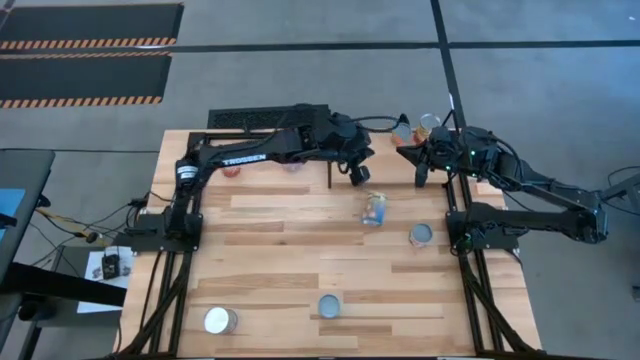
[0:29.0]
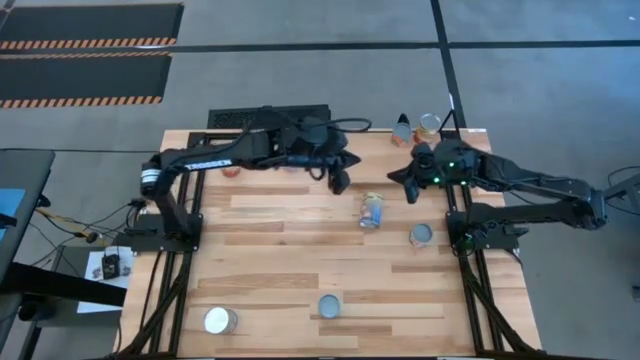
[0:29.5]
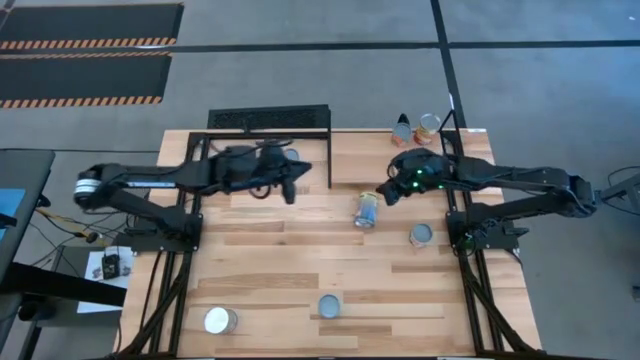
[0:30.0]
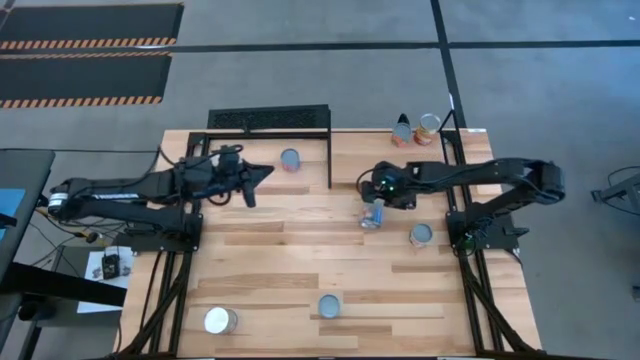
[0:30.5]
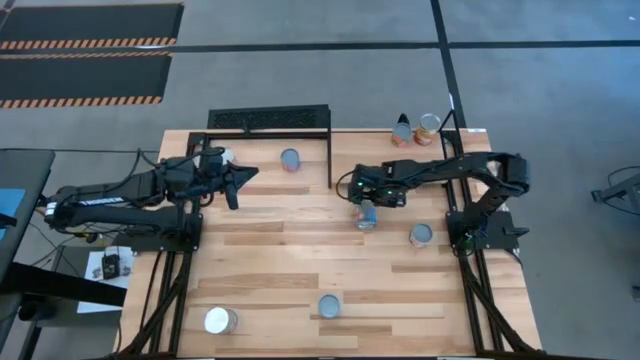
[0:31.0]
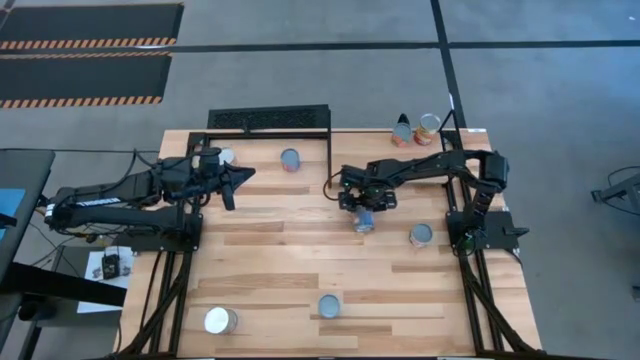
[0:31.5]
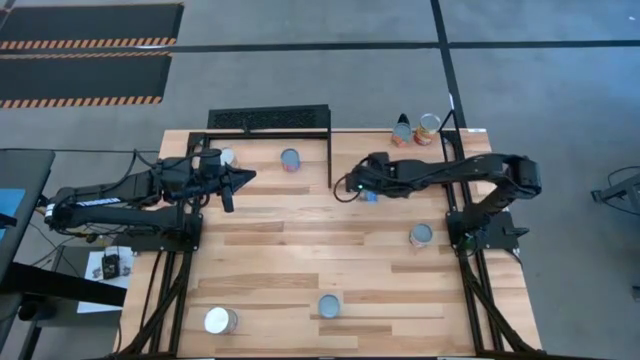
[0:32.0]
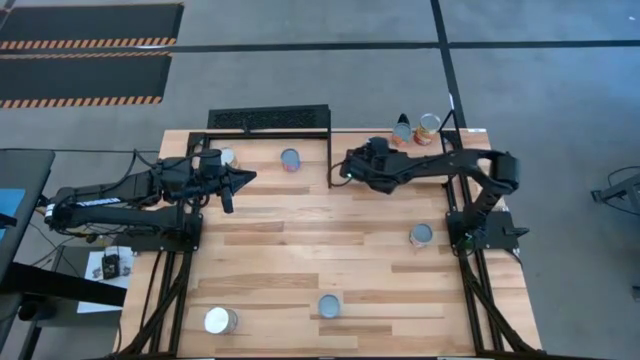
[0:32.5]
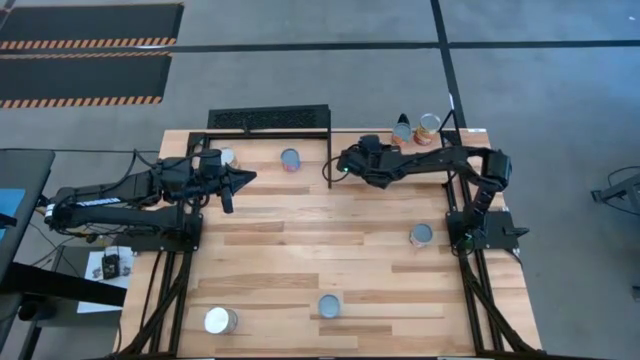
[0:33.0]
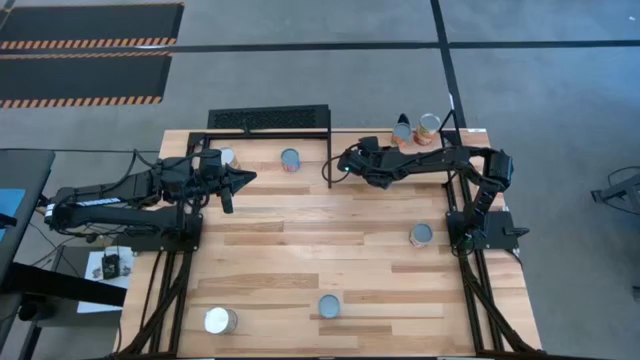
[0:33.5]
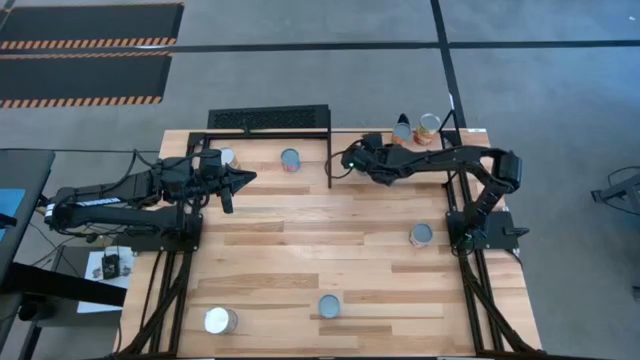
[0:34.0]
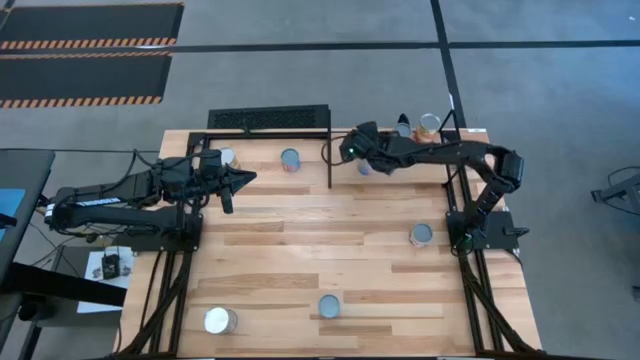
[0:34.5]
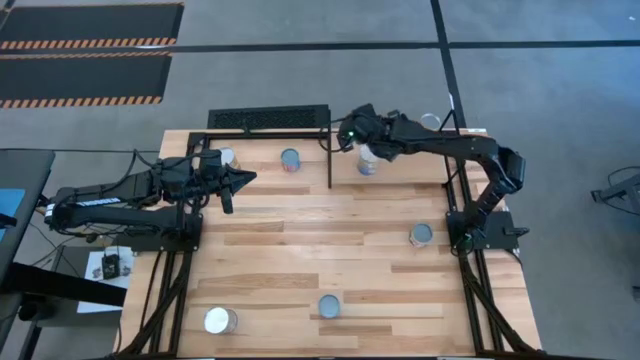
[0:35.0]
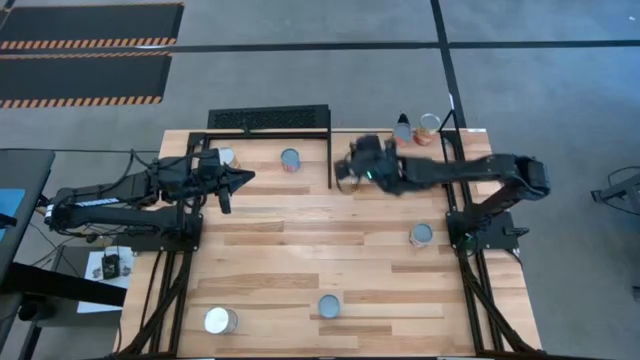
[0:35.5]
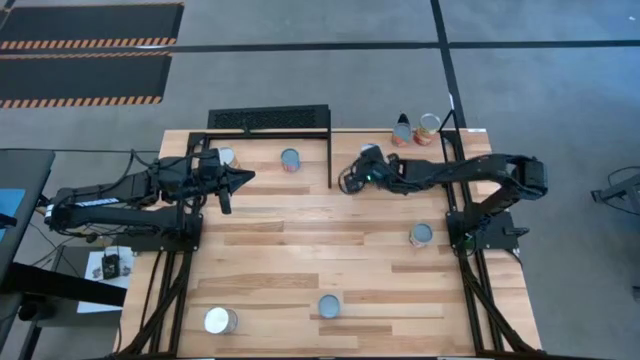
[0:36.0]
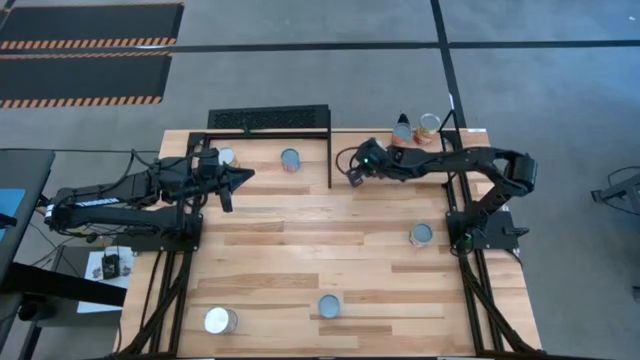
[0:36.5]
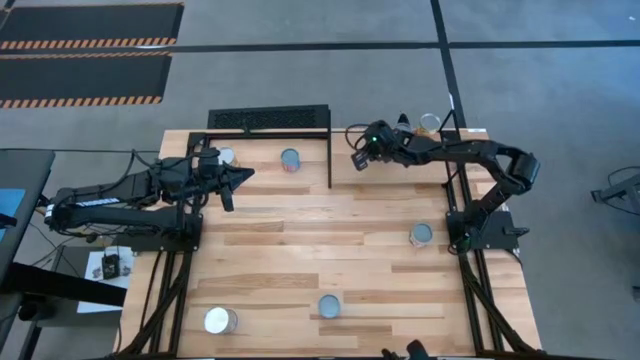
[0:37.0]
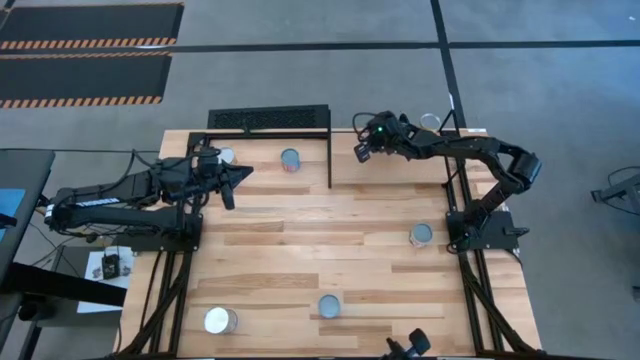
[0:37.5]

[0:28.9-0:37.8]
Task: Pick and place cans onto a shelf
Put the top canned peaches on the shelf

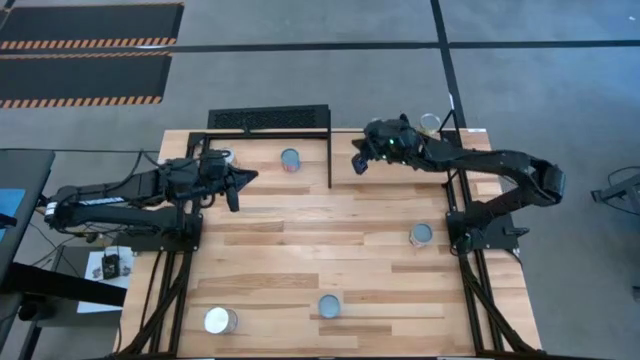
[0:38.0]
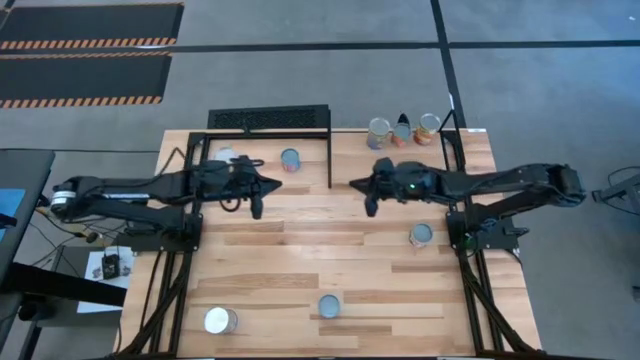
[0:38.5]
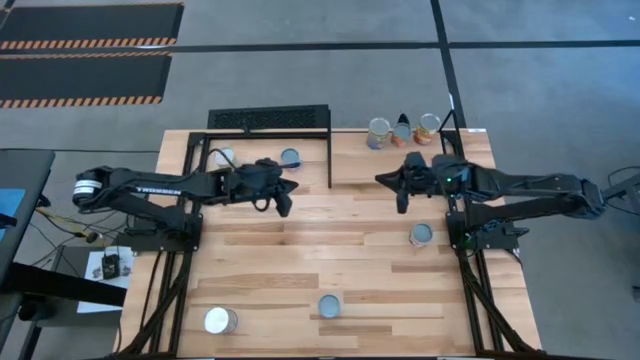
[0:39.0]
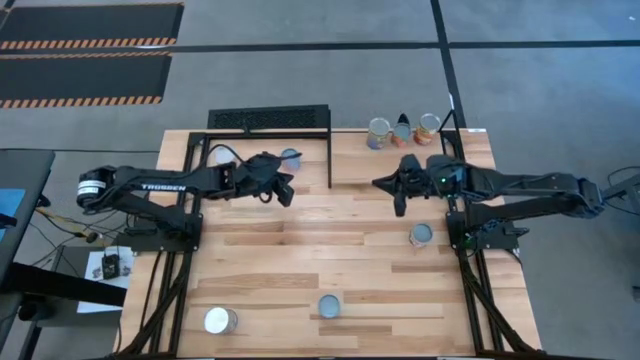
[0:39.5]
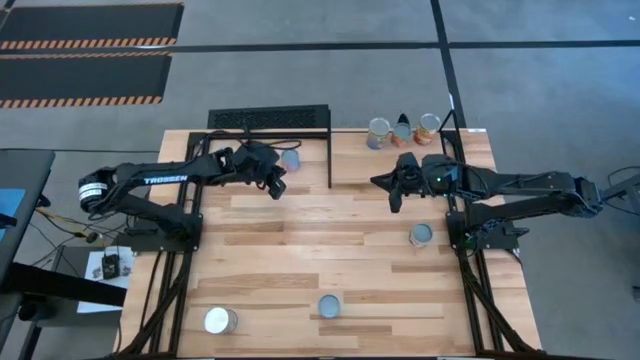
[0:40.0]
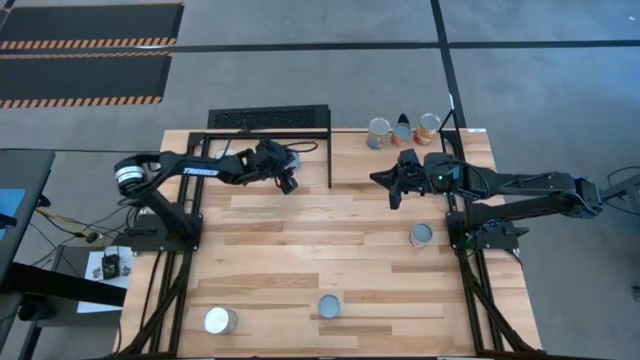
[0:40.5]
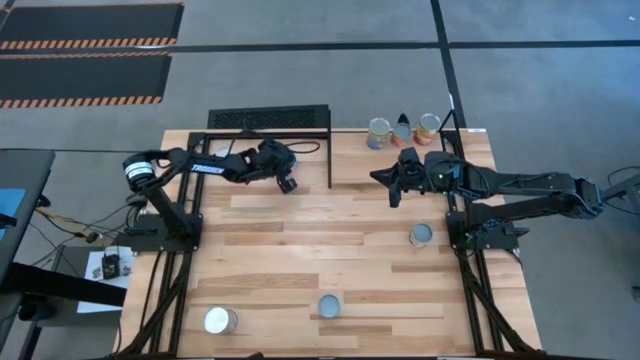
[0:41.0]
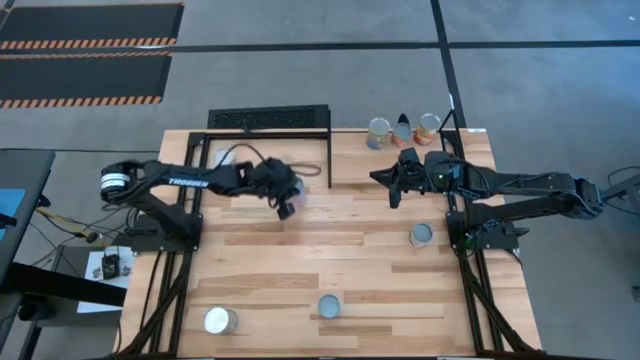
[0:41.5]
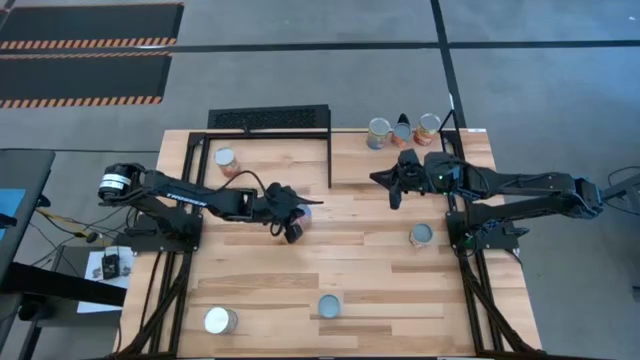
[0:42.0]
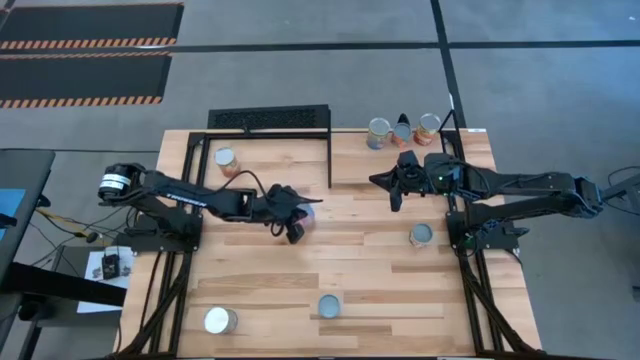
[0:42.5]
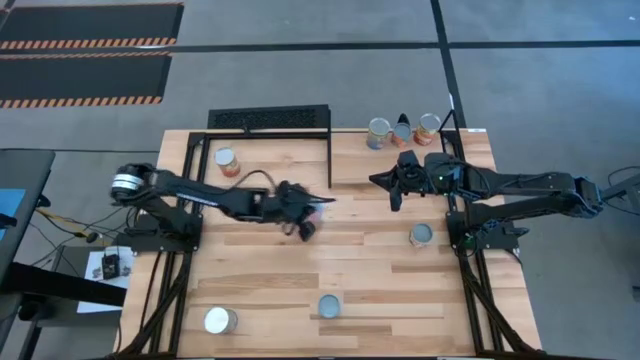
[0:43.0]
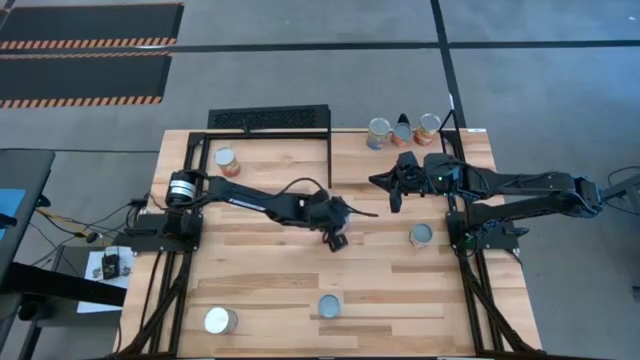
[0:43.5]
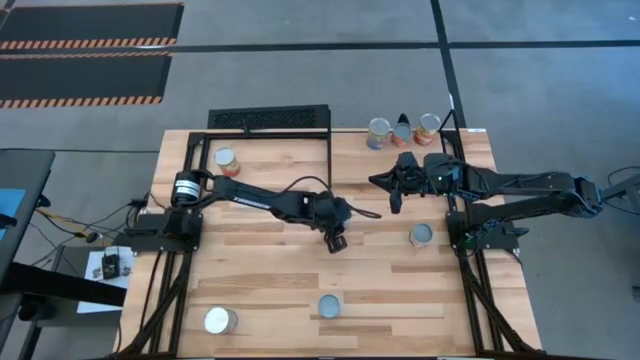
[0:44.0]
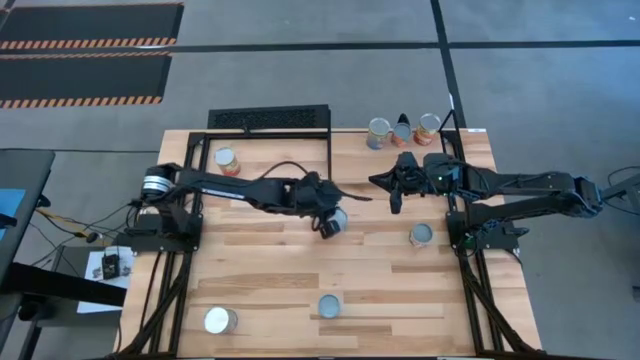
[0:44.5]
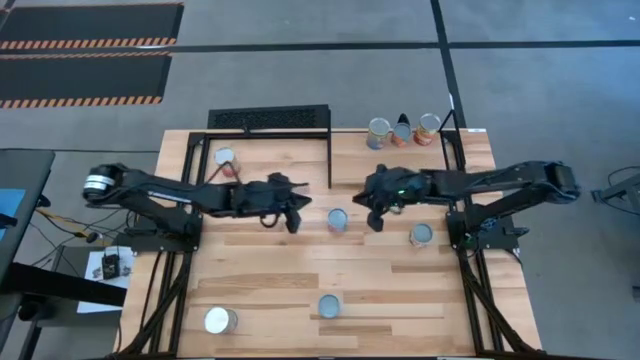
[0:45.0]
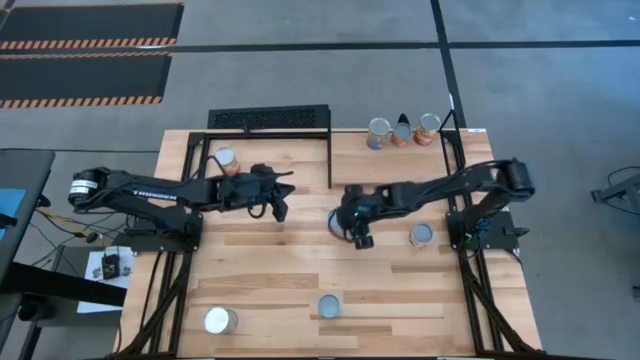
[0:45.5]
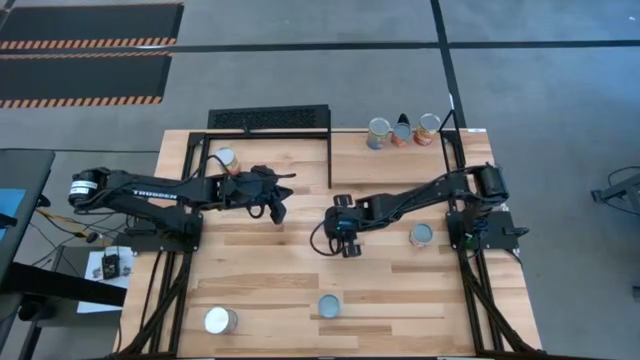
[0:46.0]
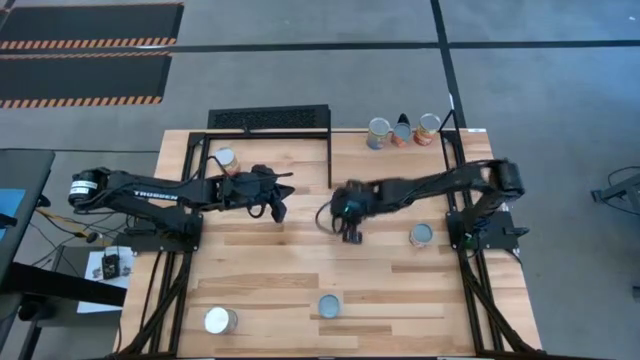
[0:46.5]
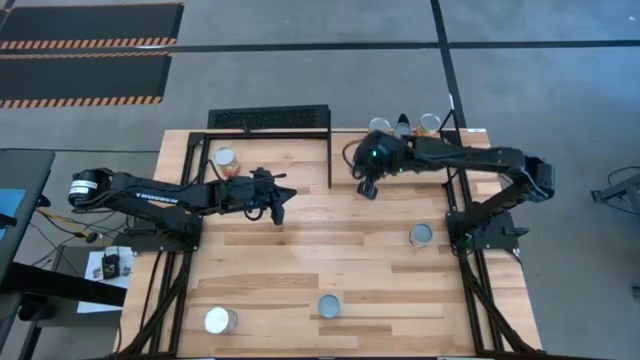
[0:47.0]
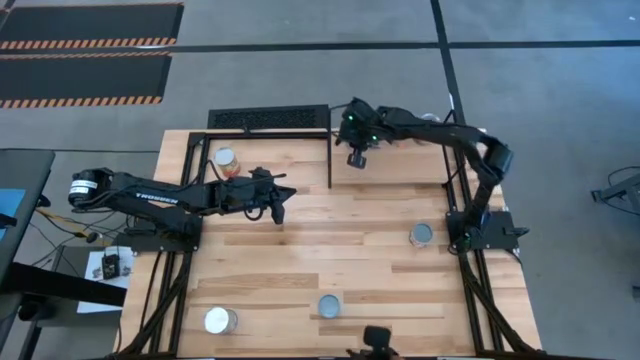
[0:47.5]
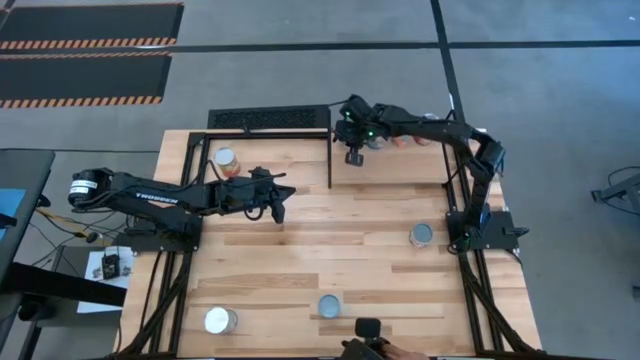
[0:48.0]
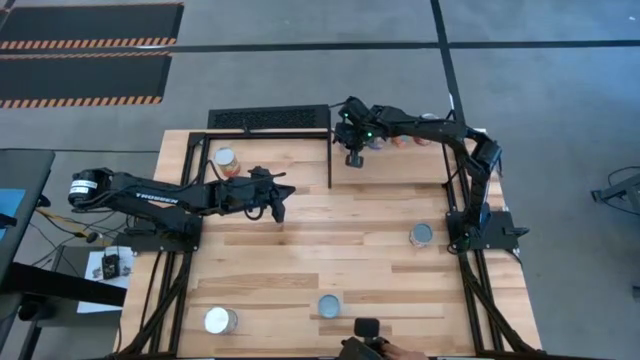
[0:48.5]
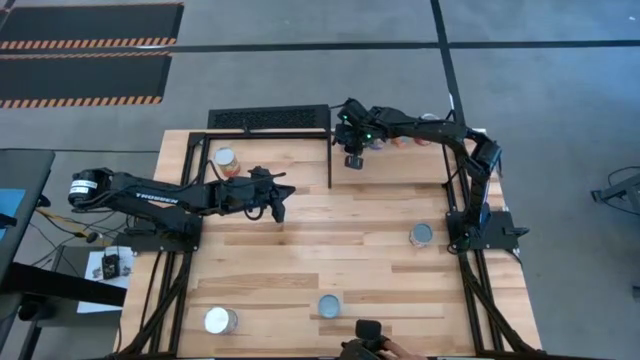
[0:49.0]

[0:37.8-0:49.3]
Put the blue canned corn on the shelf
